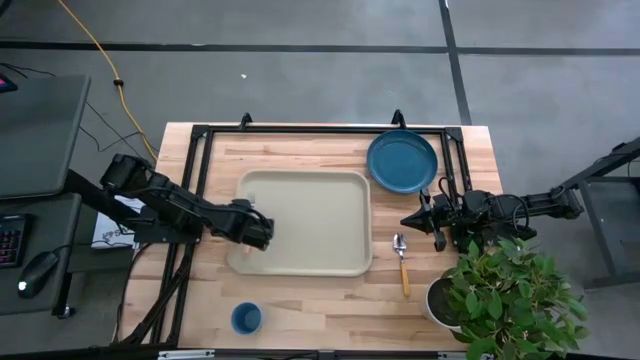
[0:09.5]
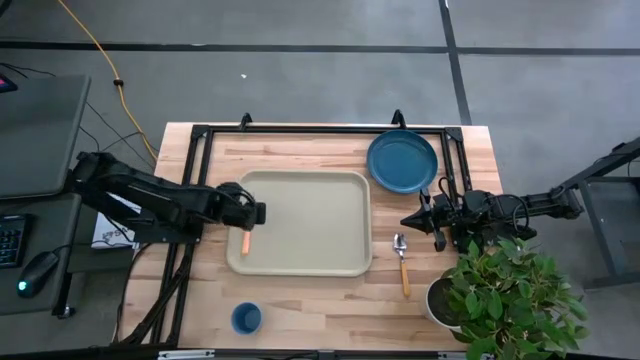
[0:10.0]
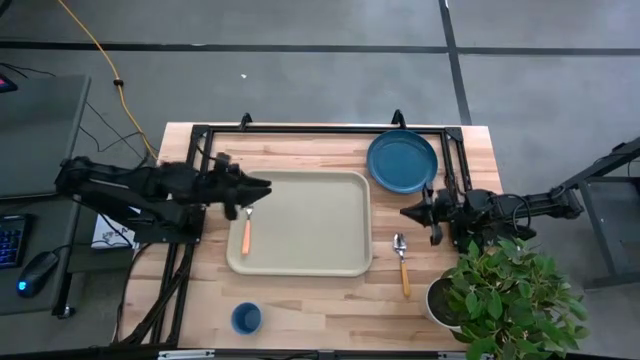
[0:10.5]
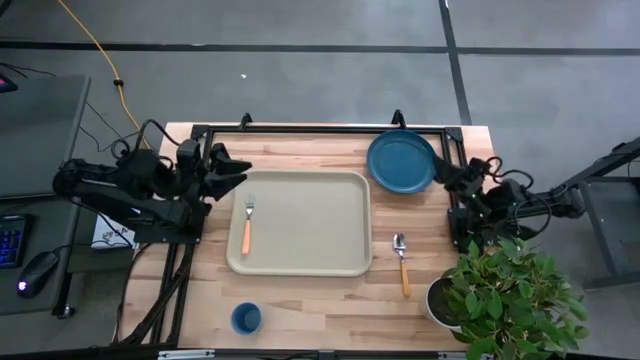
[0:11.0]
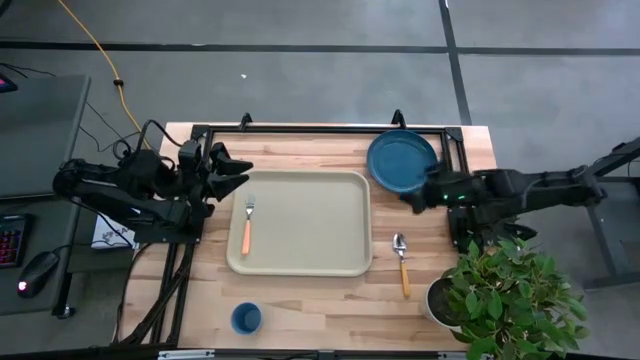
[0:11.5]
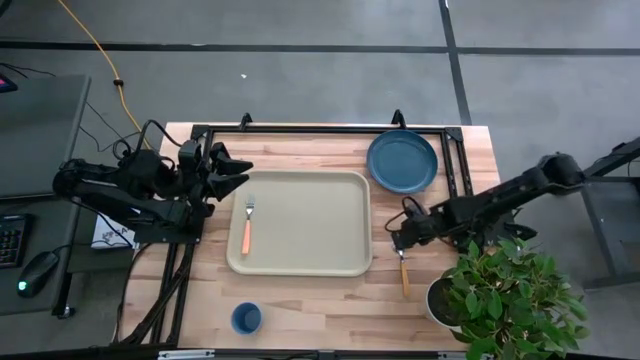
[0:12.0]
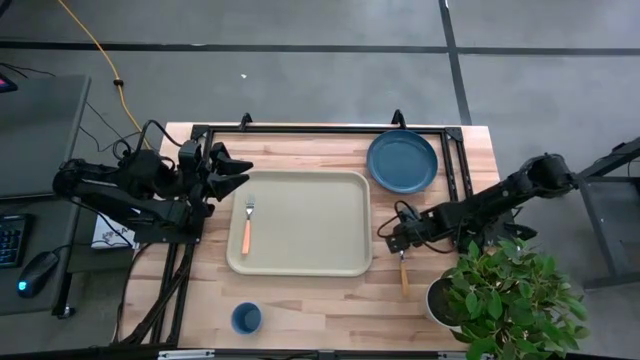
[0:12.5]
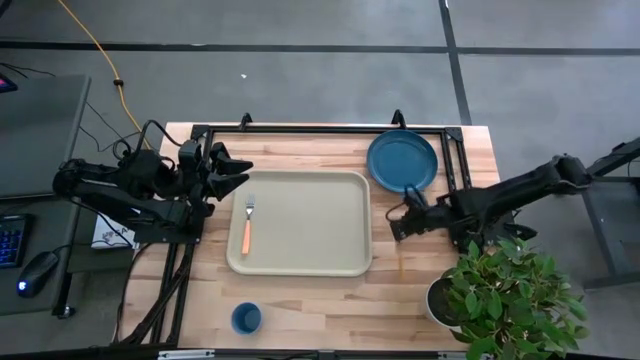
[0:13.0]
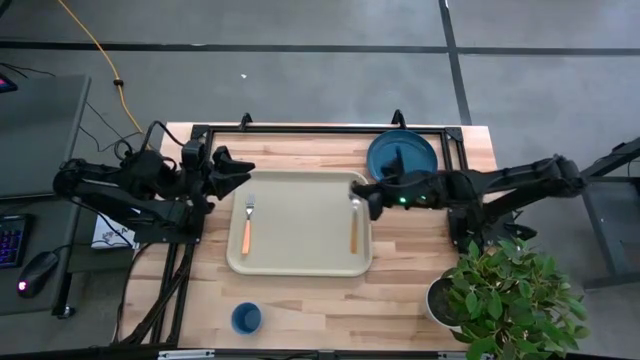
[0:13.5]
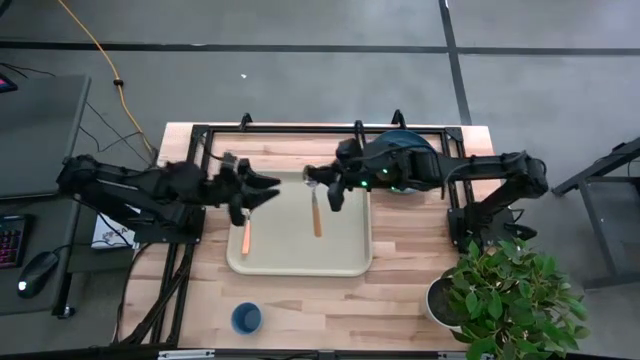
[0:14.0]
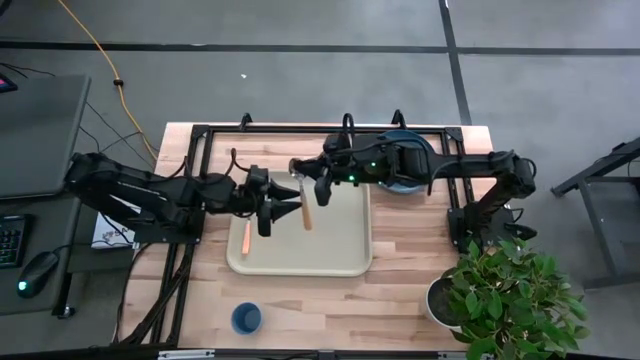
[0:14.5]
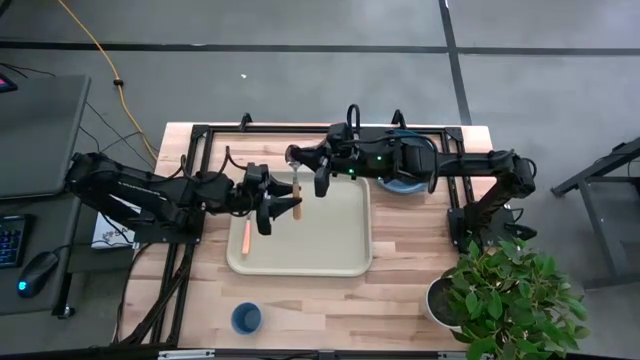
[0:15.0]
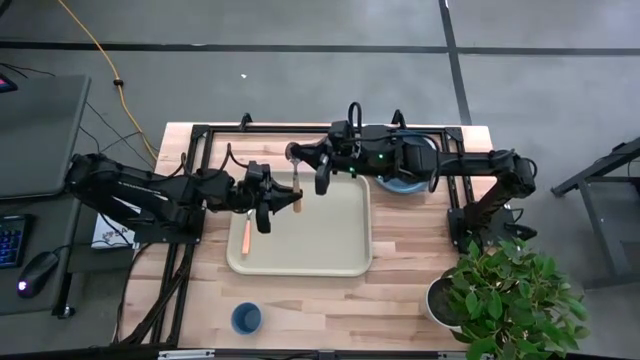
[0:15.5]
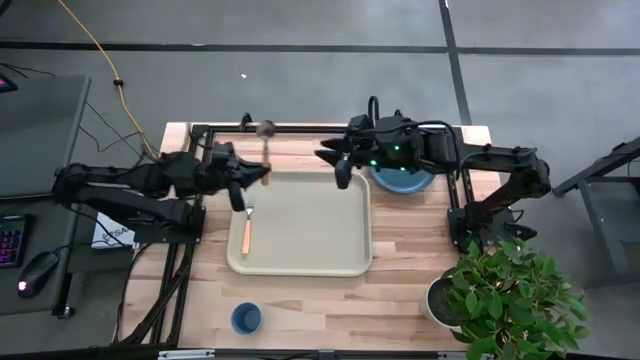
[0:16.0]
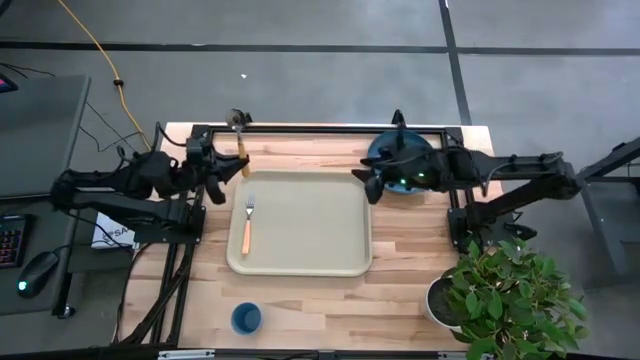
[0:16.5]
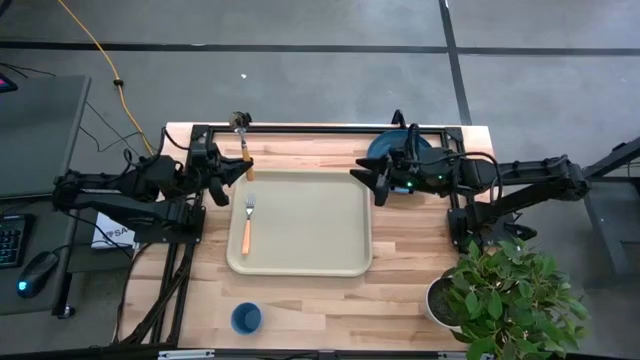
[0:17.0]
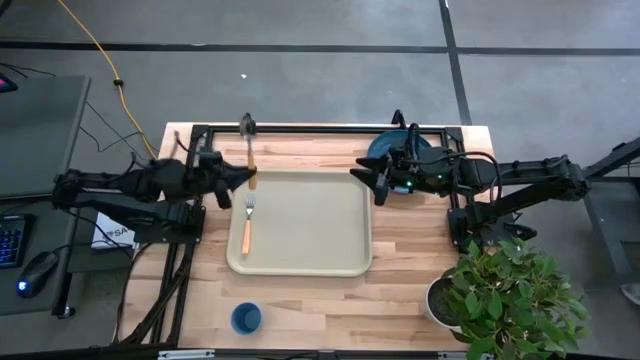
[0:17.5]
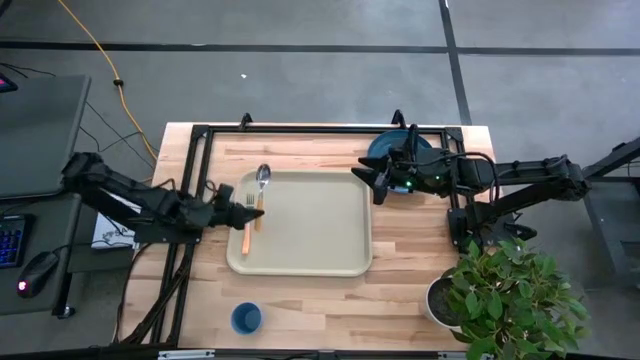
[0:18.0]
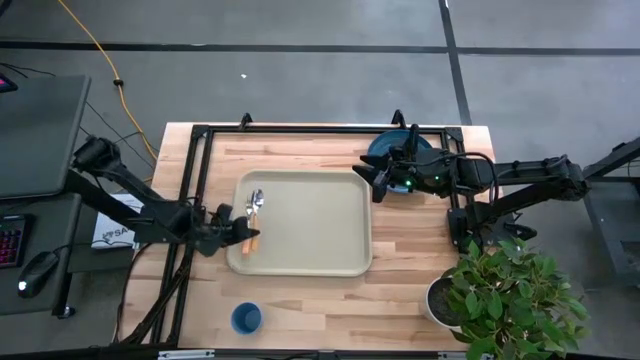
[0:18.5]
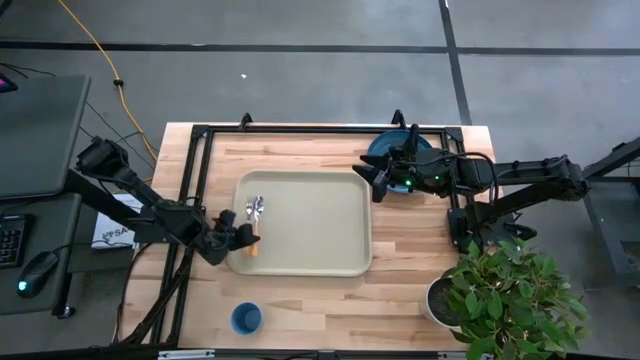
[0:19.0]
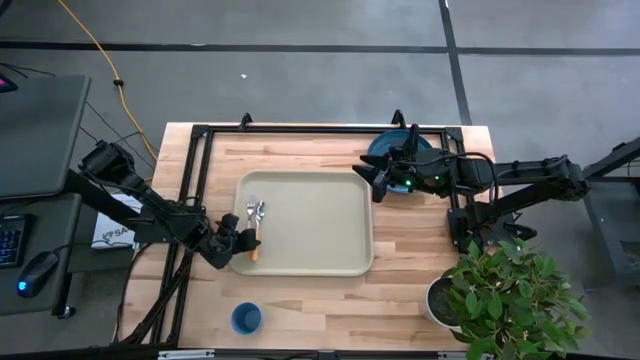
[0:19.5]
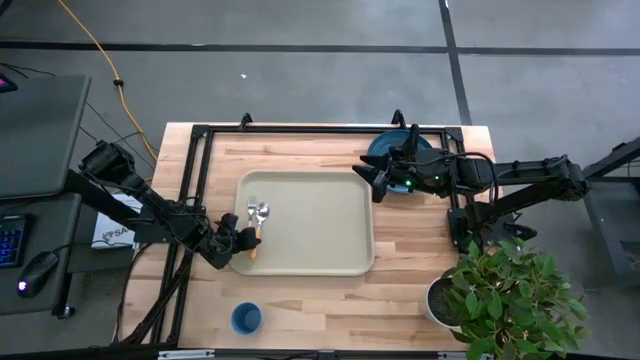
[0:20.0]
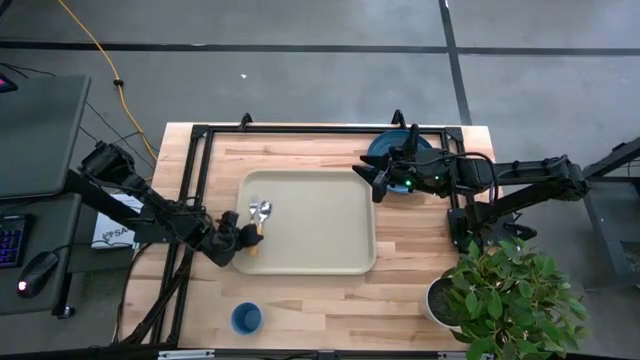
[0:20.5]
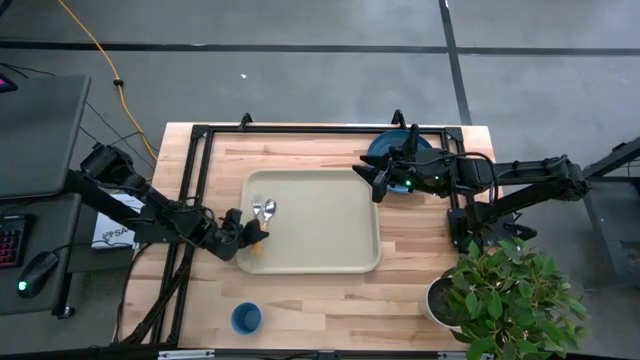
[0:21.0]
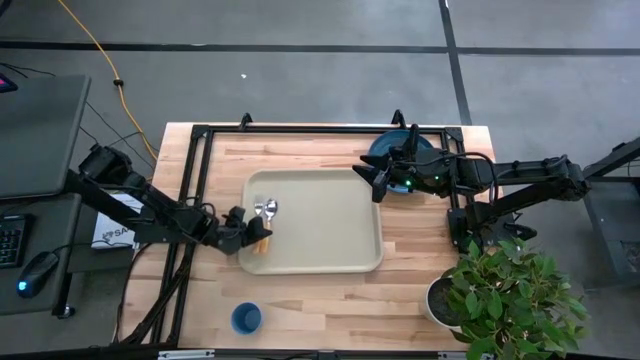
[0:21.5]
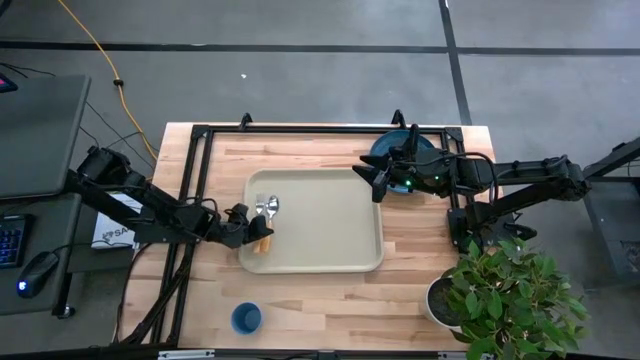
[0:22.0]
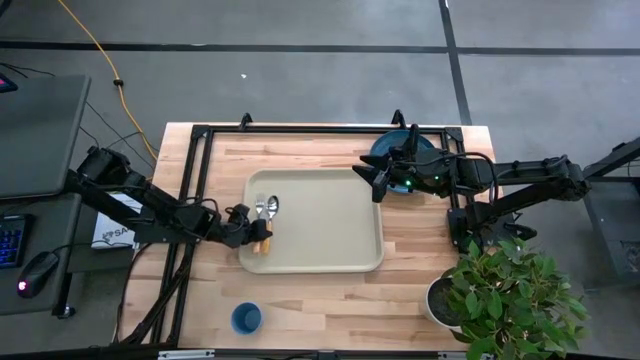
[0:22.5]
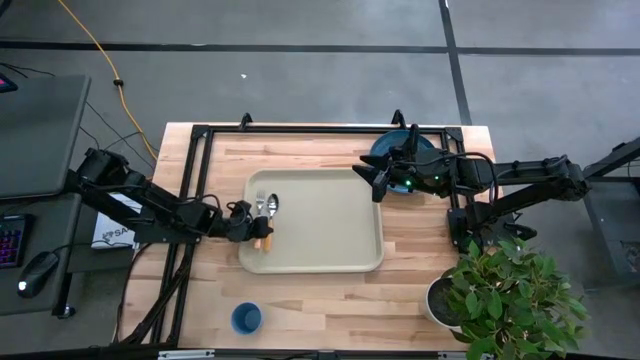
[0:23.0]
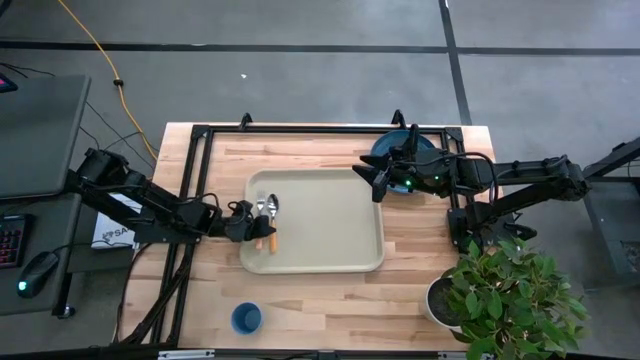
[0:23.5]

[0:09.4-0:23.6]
Task: Pick and place plate/cup/fork/spoon on tray
Put the yellow spoon to the right of the orange fork on the gray serving tray

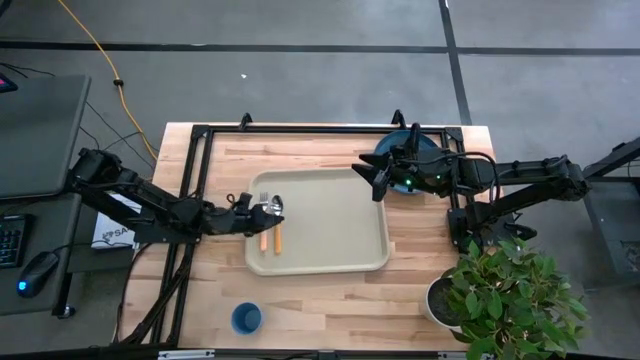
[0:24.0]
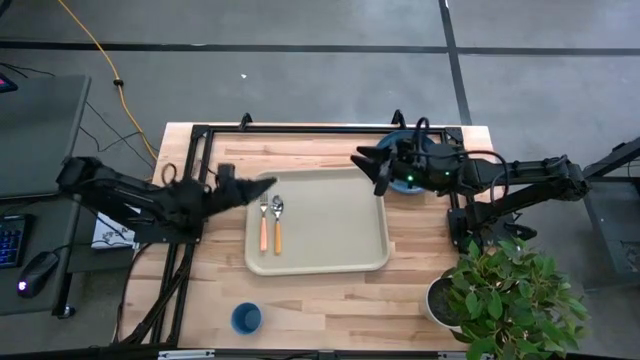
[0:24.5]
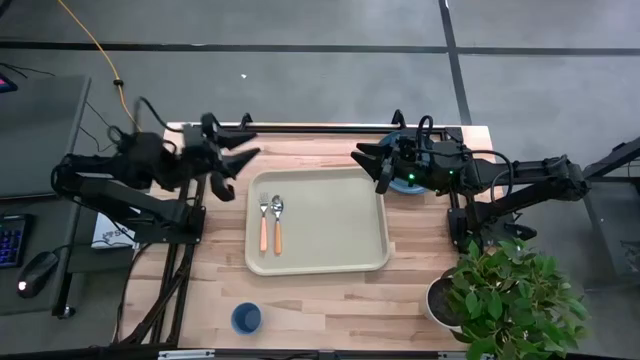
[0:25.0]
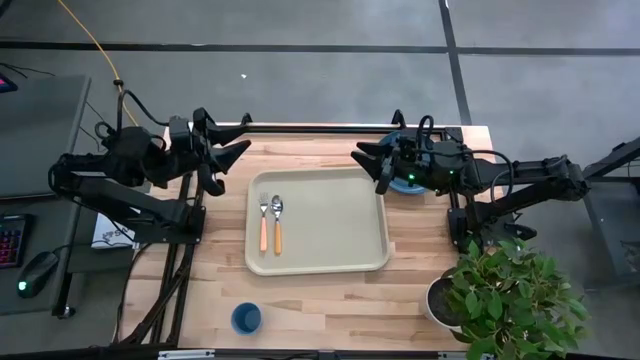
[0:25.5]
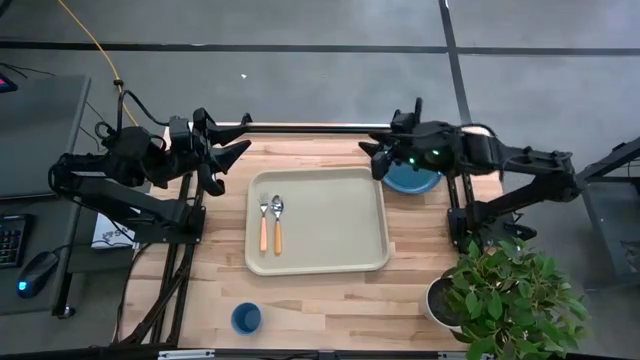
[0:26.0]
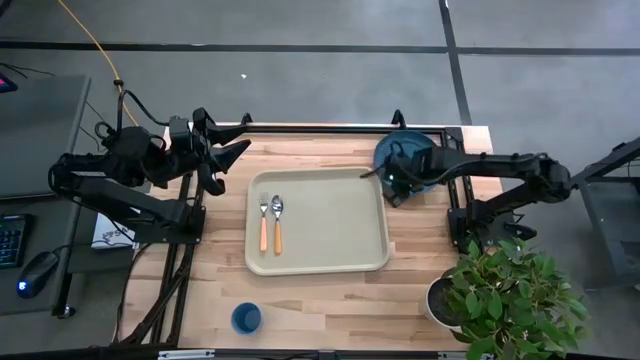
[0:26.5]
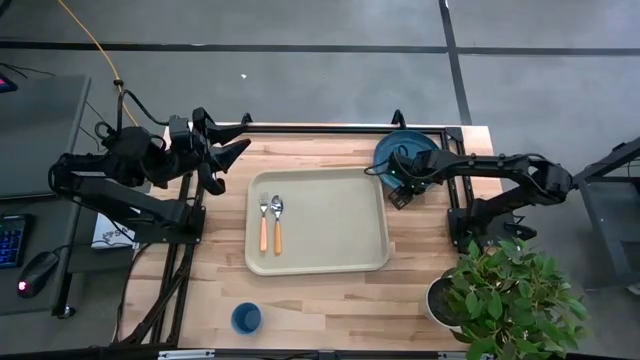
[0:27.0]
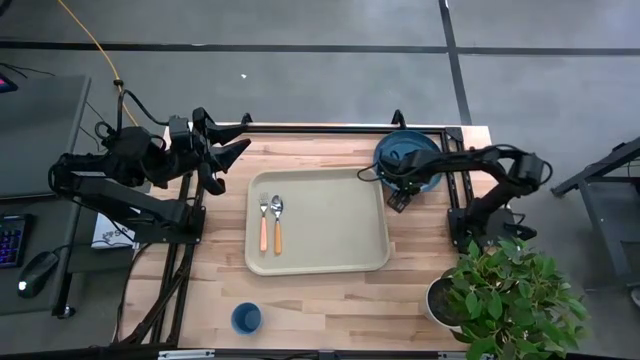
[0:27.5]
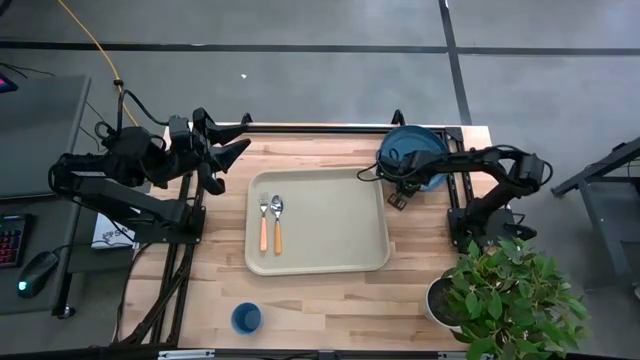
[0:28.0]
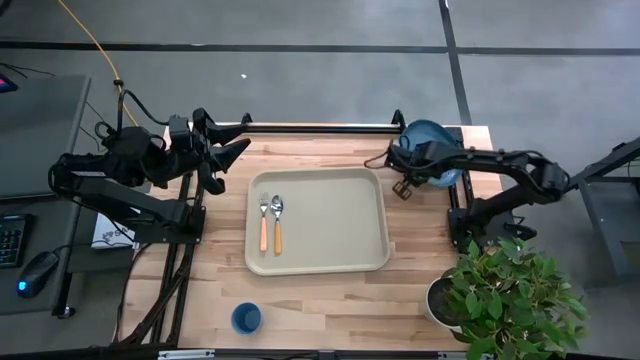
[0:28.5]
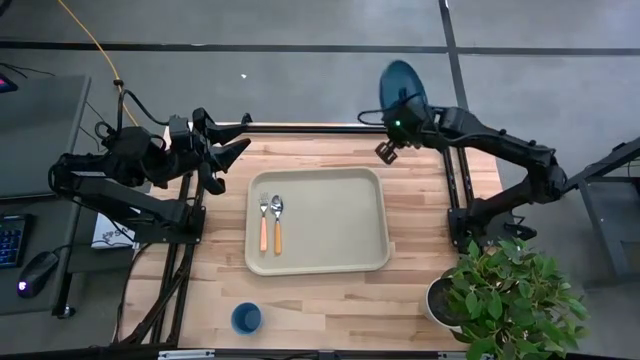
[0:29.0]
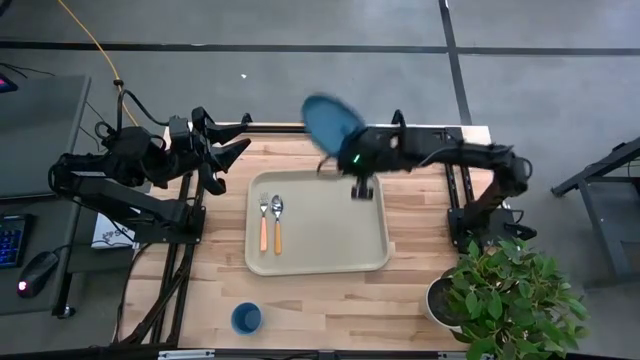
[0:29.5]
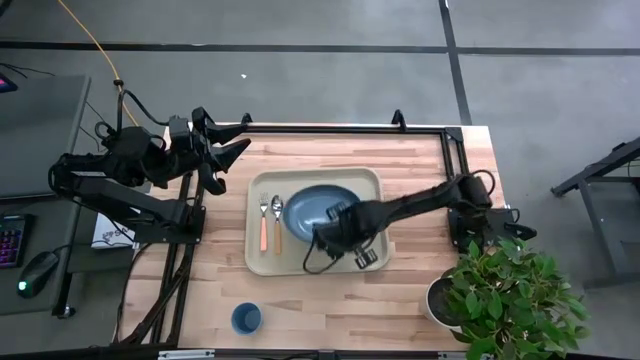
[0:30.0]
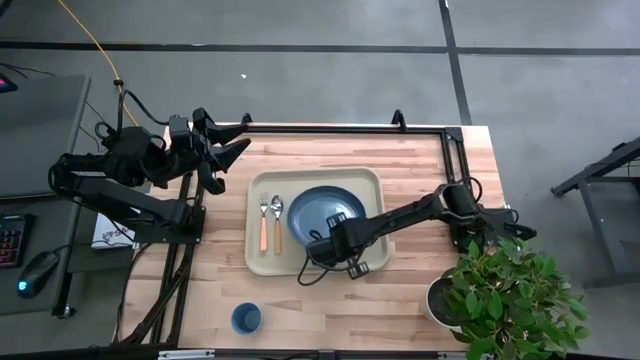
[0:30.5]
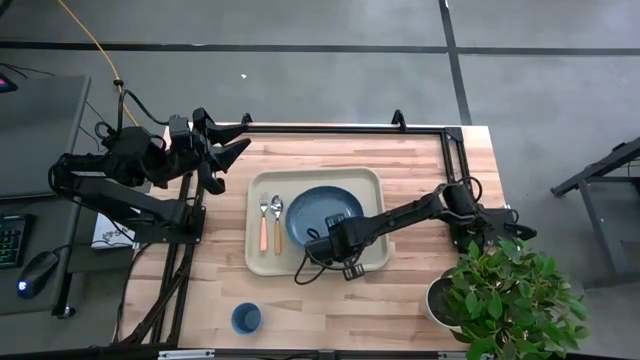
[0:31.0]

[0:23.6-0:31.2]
Put the blue plate to the right of the yellow spoon on the gray serving tray
